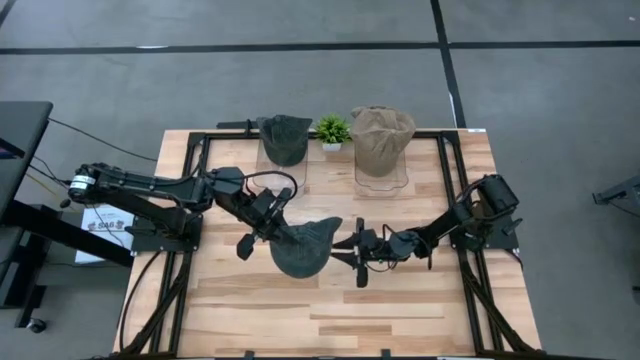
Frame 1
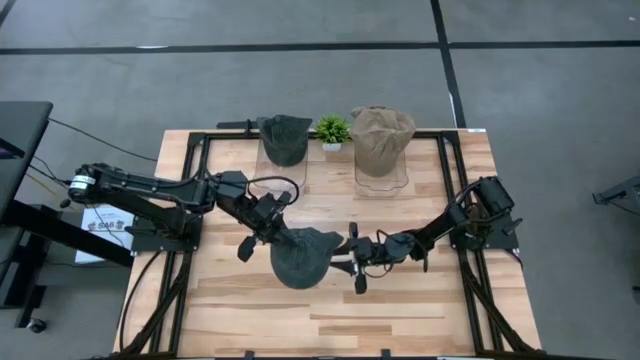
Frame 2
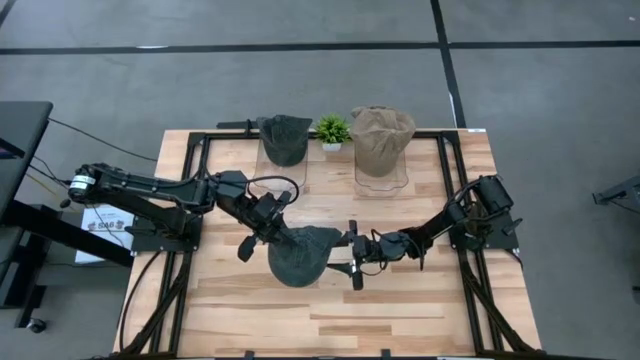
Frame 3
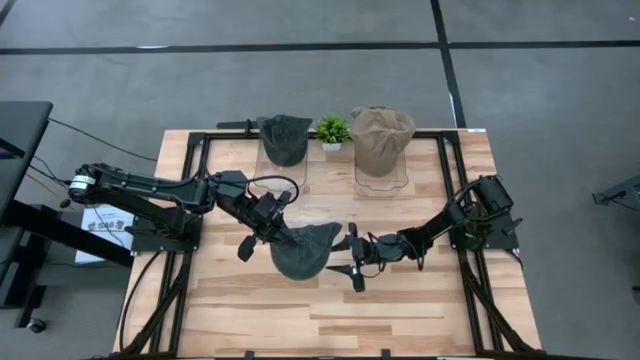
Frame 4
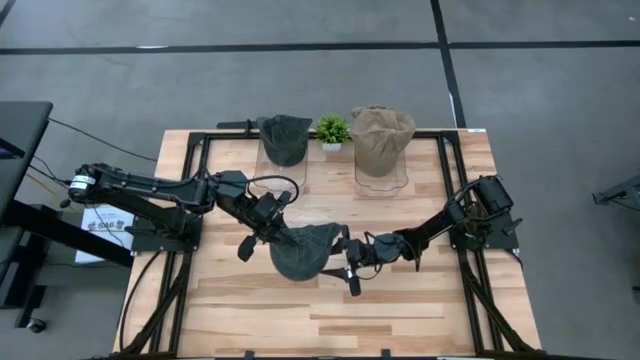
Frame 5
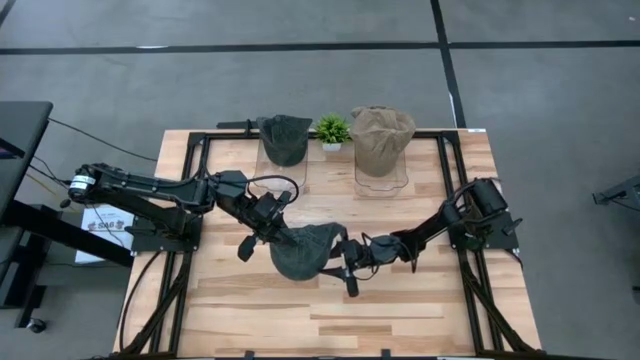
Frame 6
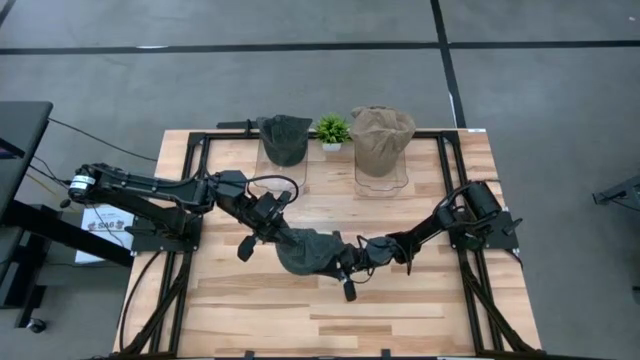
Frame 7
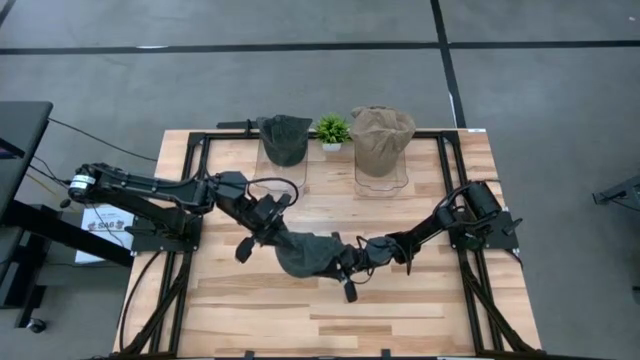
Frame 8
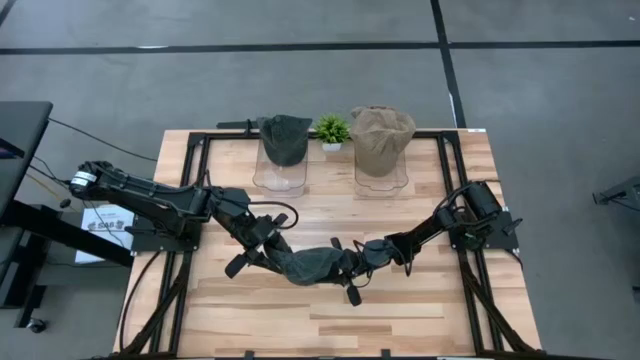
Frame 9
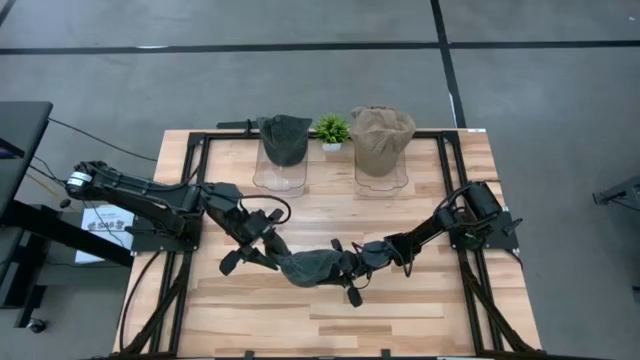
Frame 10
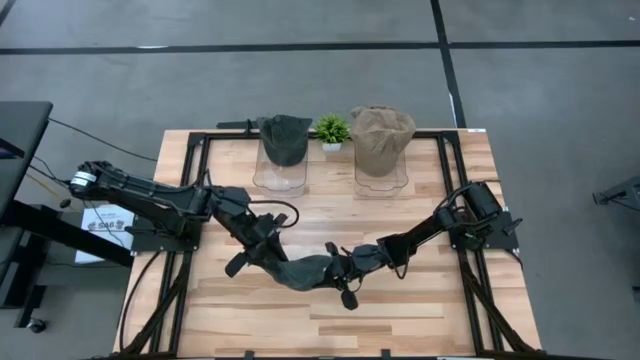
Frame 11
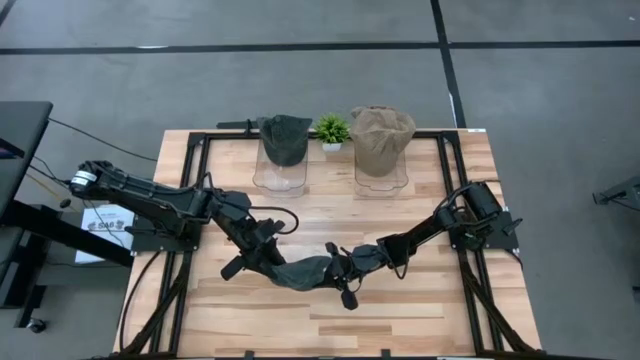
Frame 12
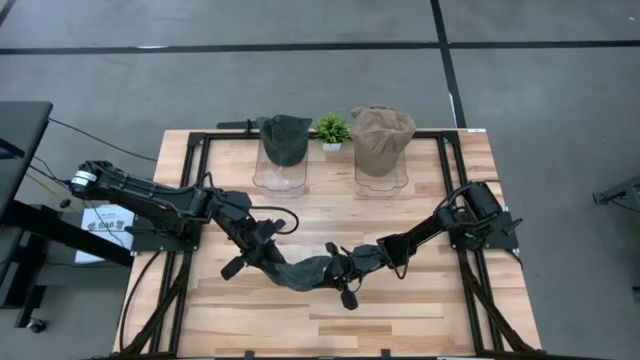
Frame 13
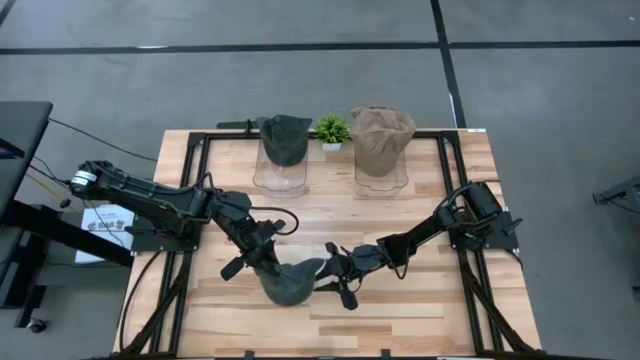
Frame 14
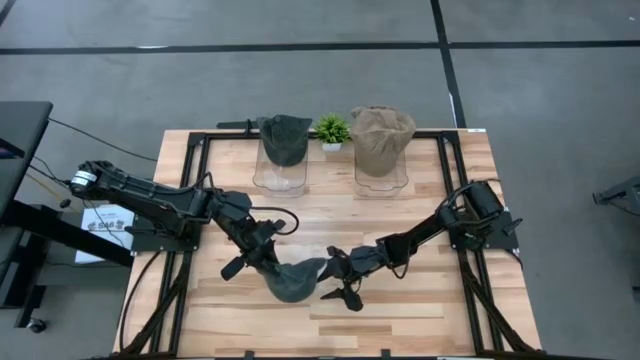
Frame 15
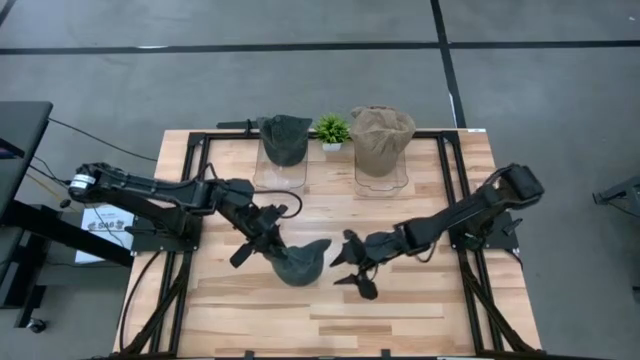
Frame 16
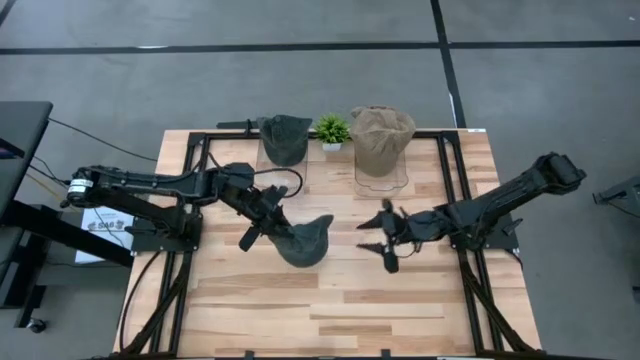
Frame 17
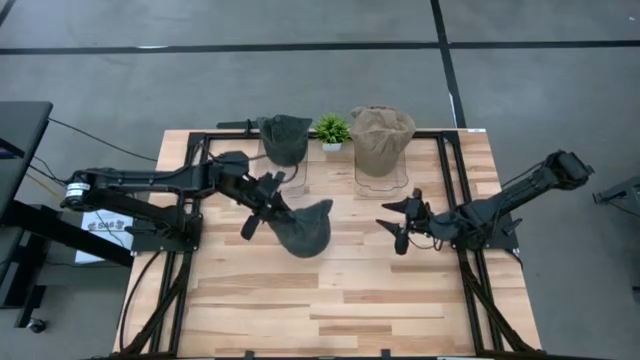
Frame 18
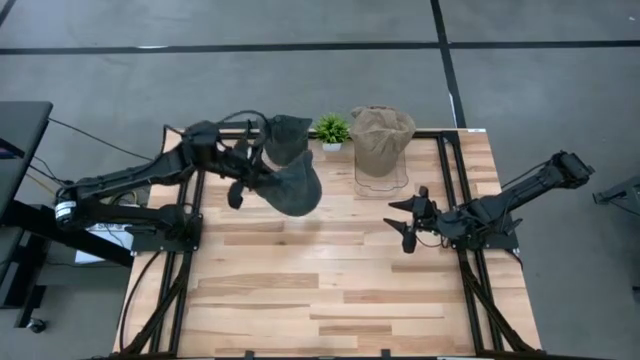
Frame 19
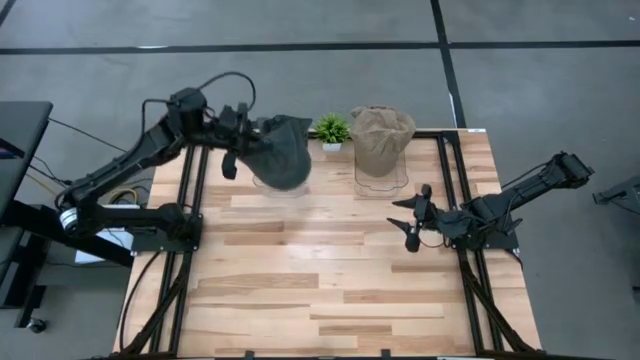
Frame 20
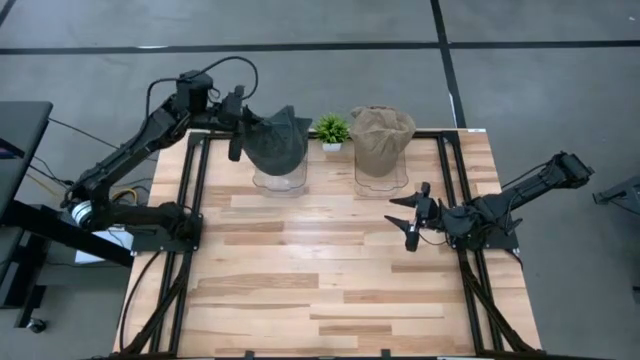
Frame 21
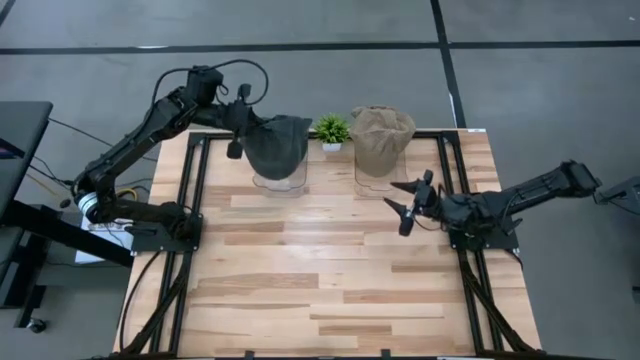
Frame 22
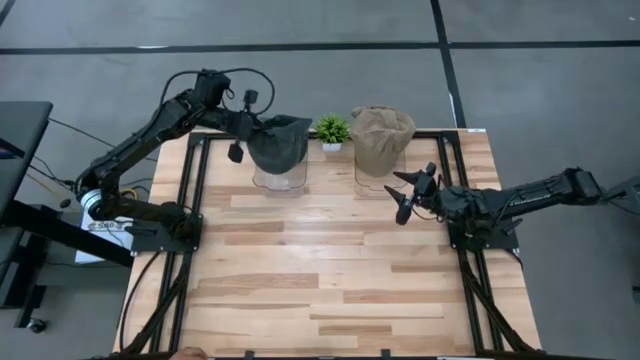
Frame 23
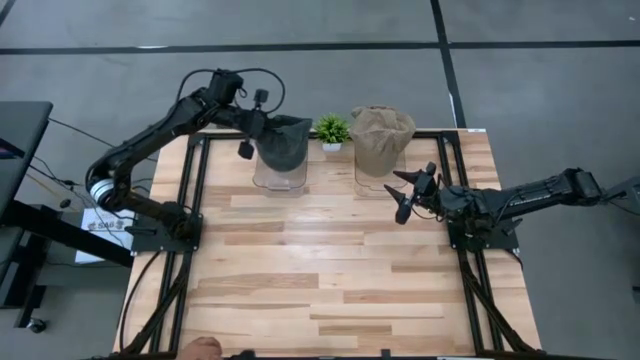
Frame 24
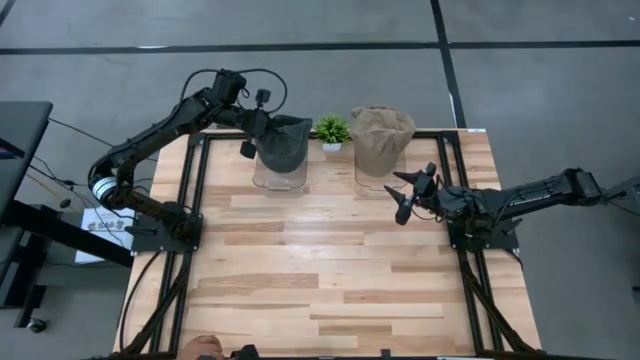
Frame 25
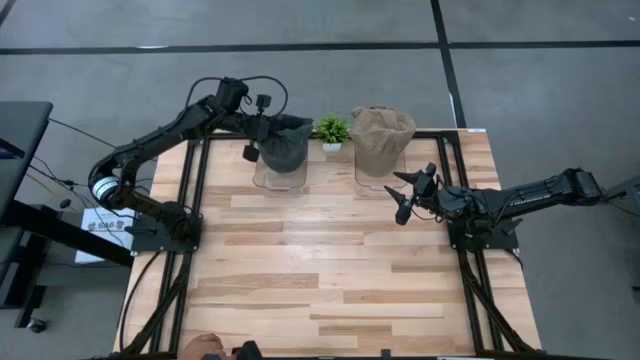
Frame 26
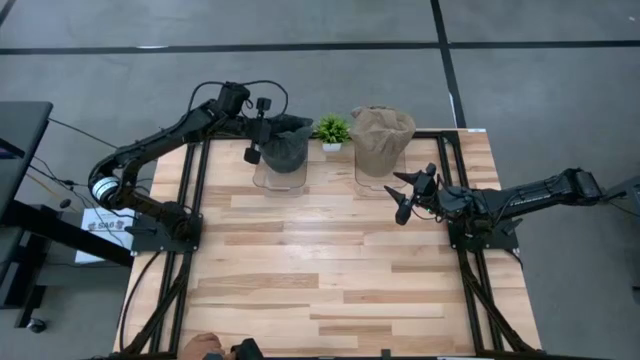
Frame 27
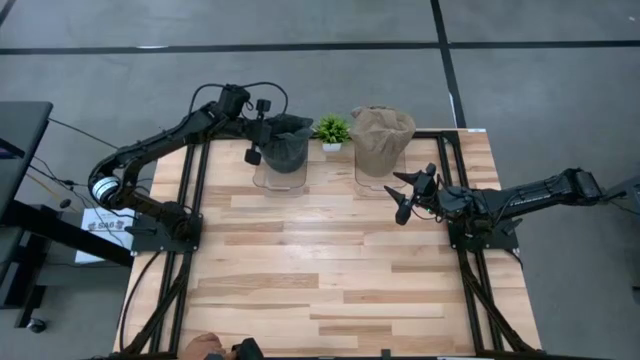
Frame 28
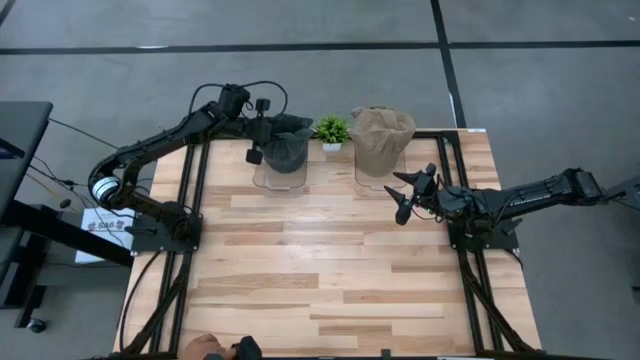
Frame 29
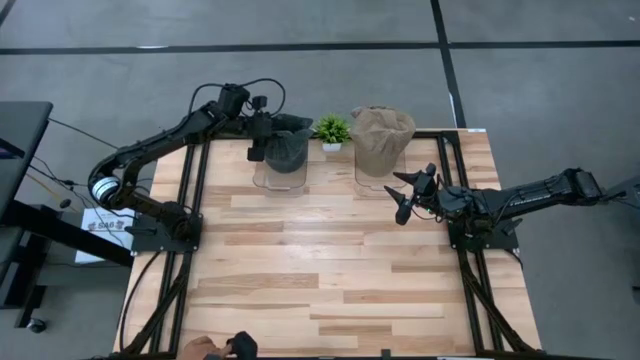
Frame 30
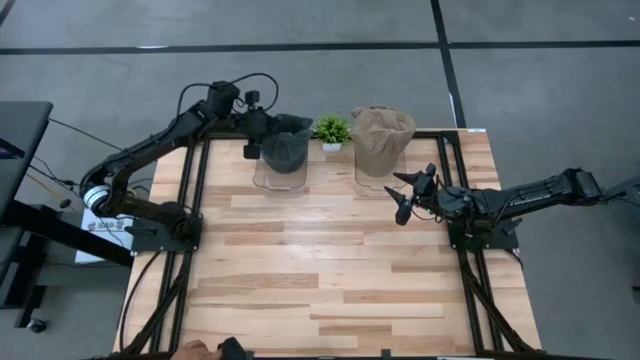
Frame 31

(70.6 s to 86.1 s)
Task: Pick & Place hat
Put the blue cap into the left transparent bin

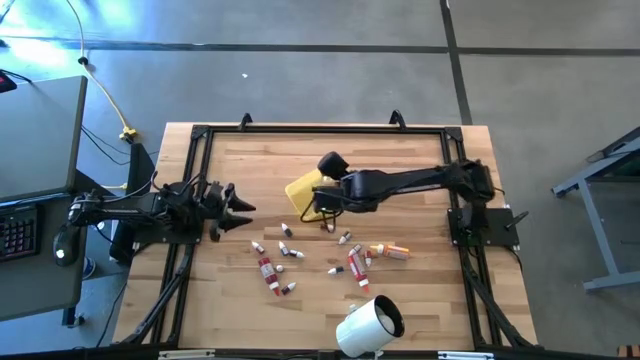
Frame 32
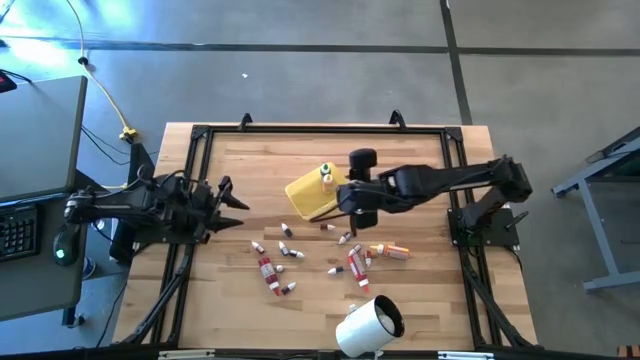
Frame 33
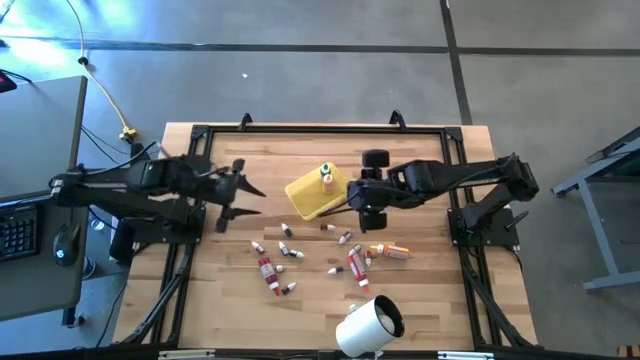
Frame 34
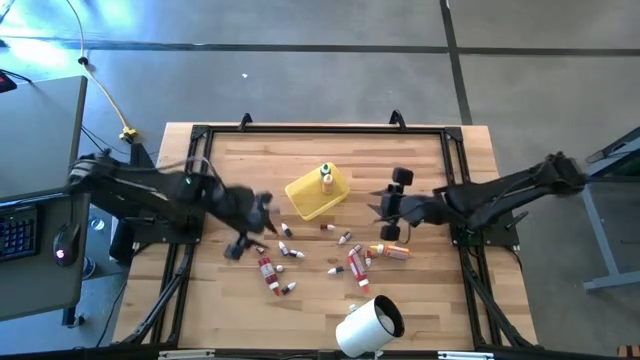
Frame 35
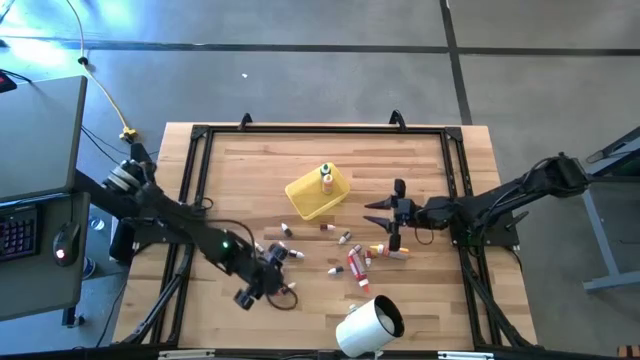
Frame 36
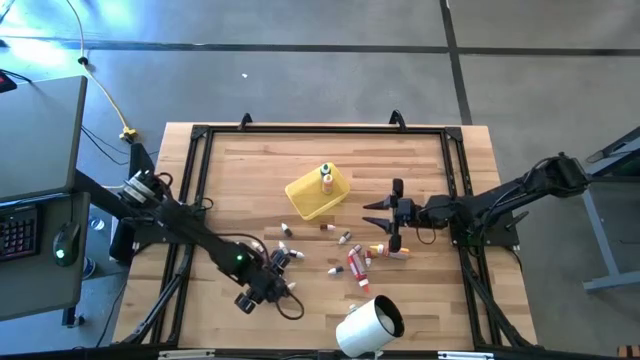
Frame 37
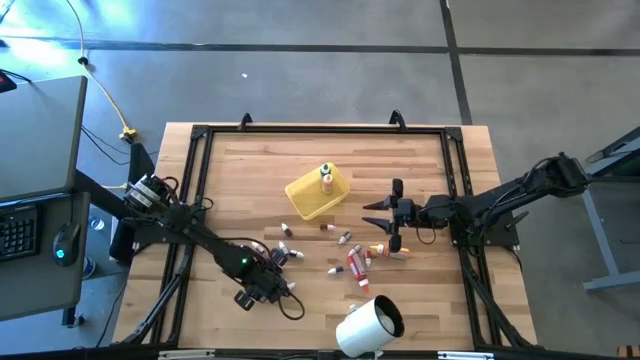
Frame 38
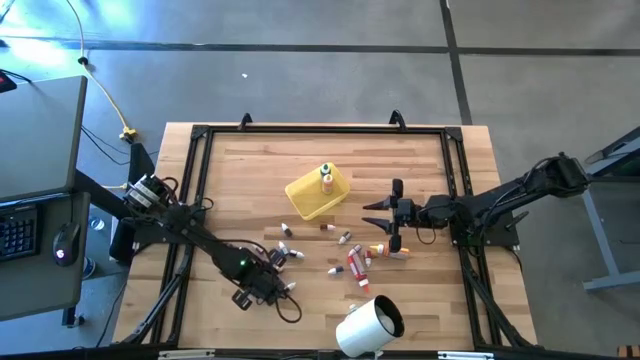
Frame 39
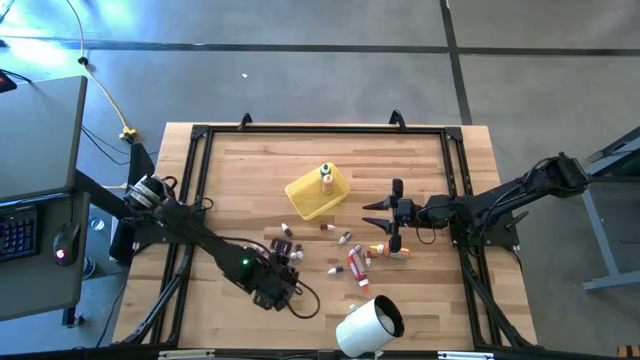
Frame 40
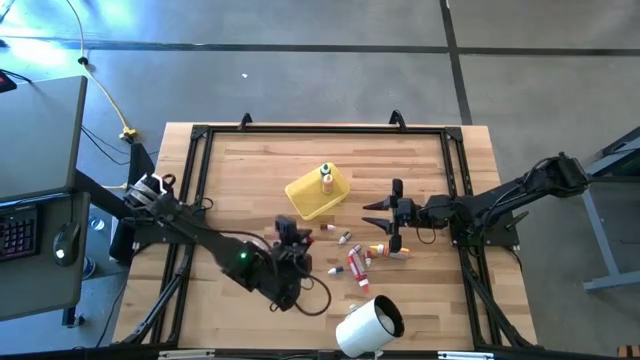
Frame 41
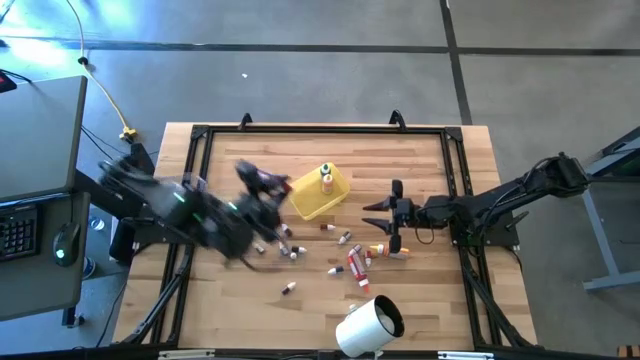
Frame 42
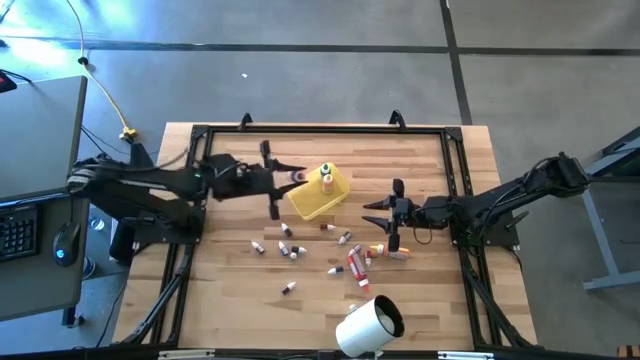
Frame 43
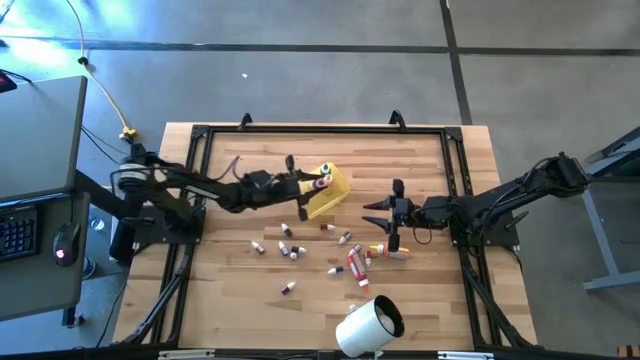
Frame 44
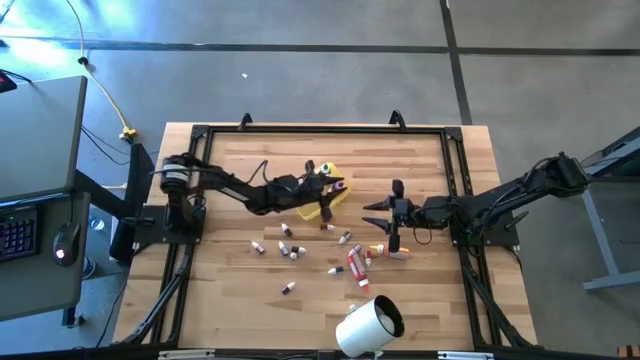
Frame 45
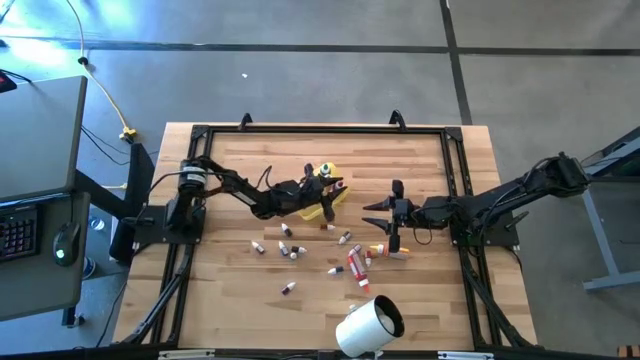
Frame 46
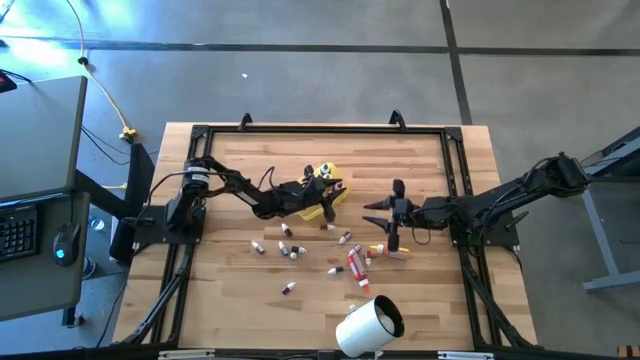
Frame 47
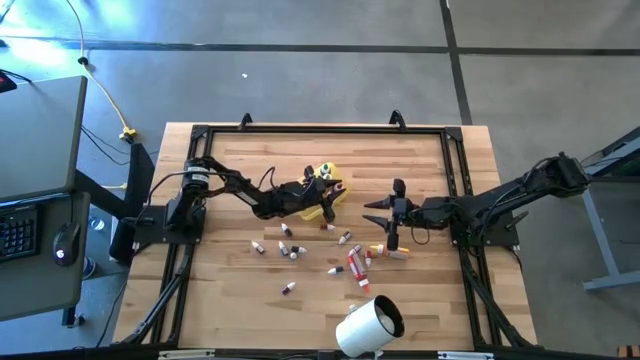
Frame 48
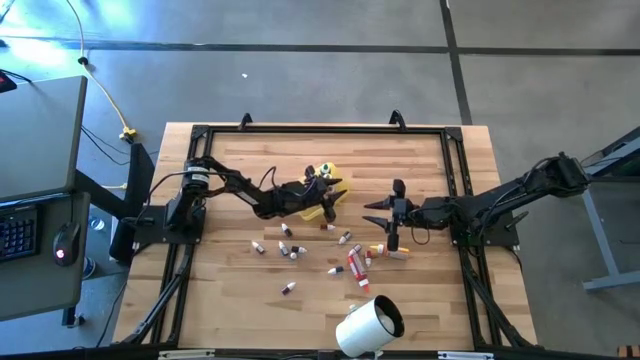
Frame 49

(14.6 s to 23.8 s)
Task: Pick & Place food coloring
Put the large red food coloring bottle into the yellow container
